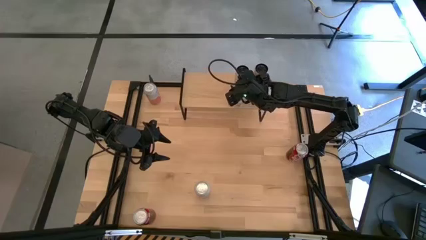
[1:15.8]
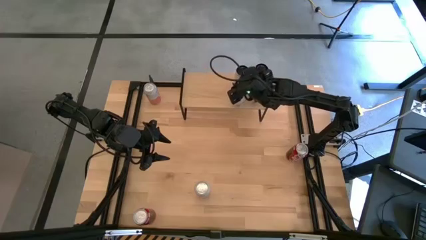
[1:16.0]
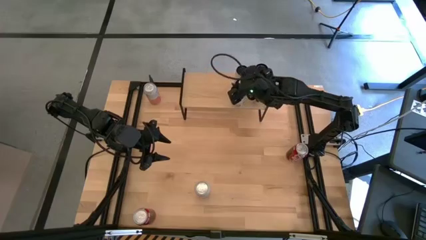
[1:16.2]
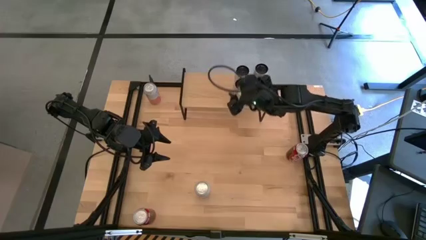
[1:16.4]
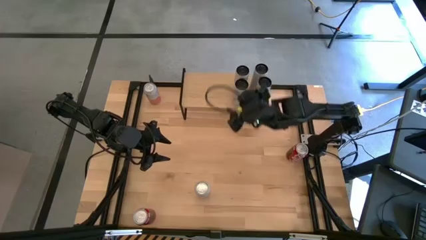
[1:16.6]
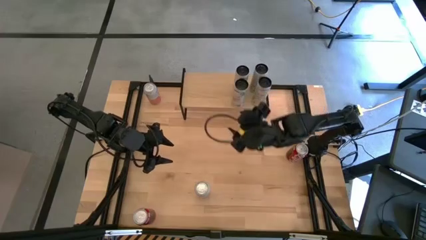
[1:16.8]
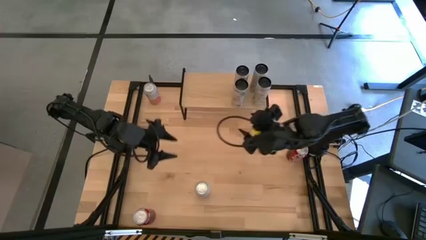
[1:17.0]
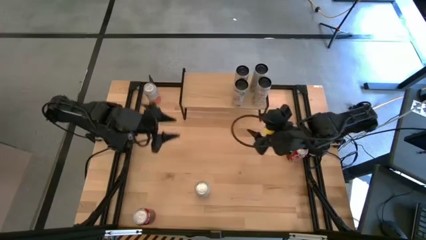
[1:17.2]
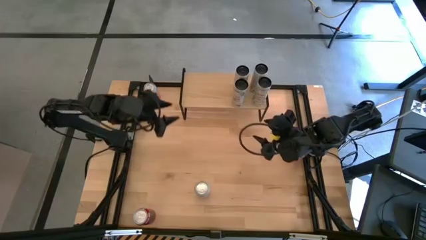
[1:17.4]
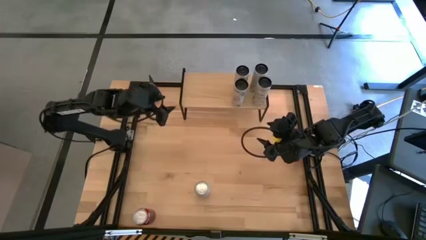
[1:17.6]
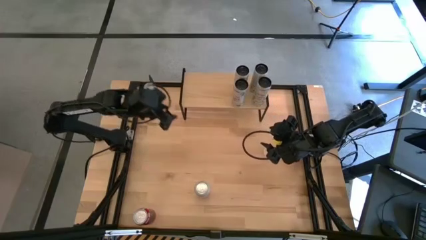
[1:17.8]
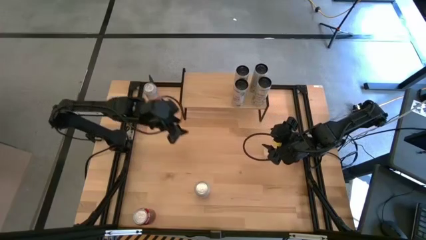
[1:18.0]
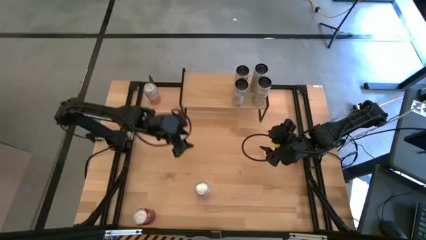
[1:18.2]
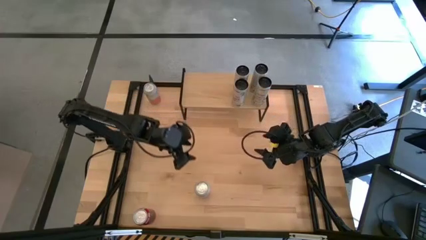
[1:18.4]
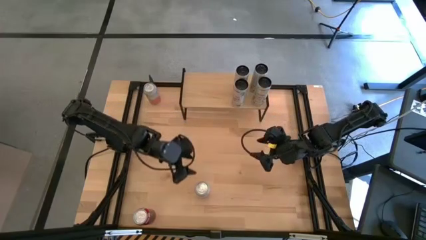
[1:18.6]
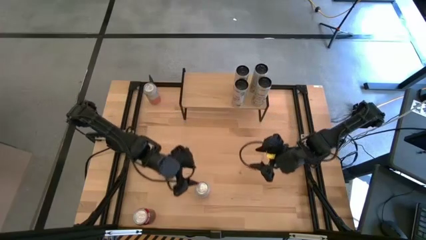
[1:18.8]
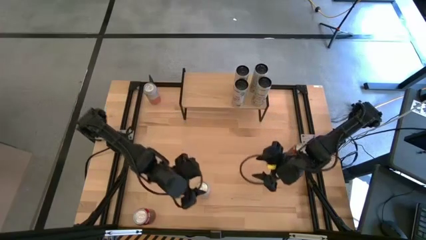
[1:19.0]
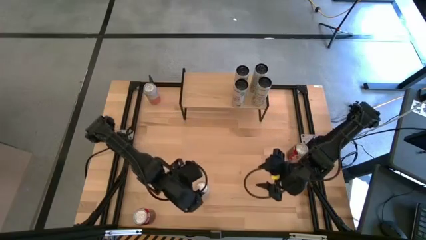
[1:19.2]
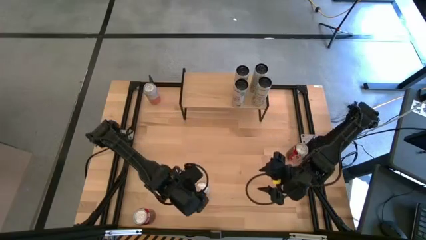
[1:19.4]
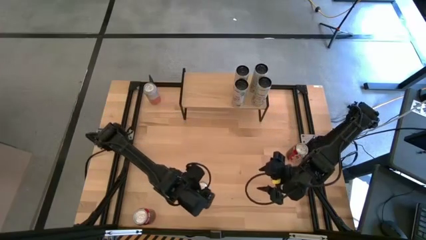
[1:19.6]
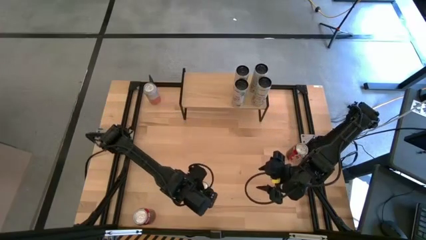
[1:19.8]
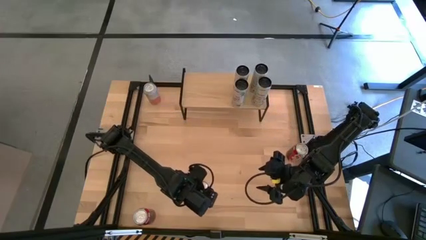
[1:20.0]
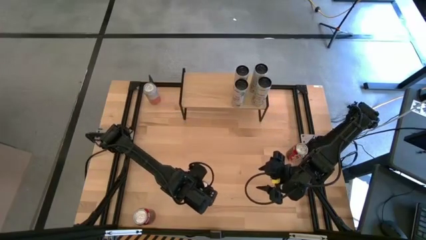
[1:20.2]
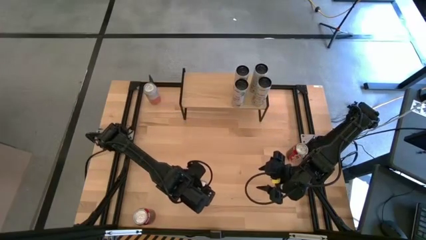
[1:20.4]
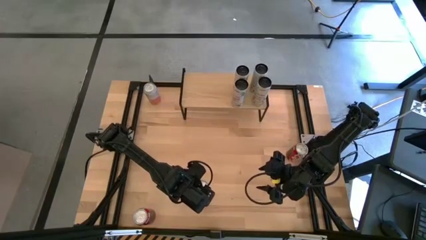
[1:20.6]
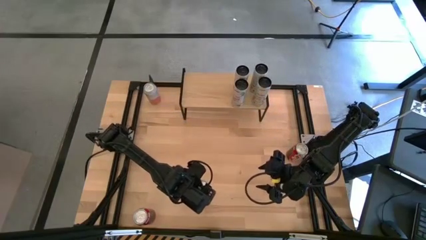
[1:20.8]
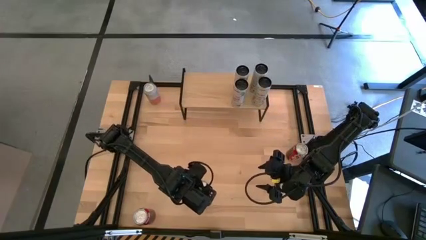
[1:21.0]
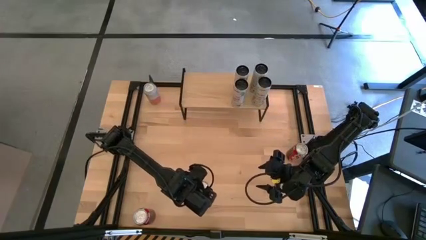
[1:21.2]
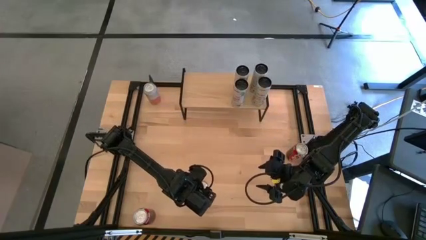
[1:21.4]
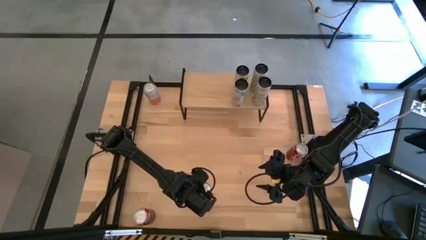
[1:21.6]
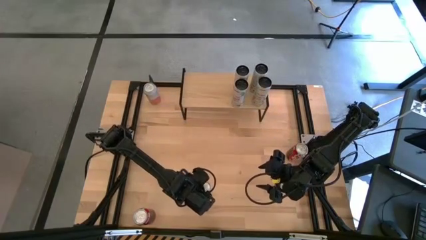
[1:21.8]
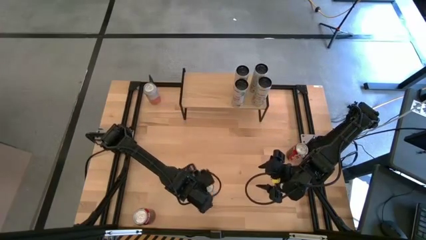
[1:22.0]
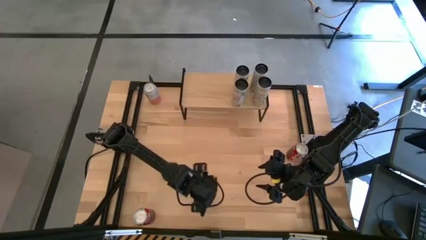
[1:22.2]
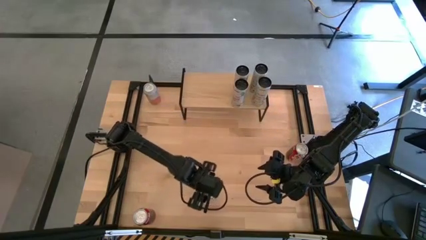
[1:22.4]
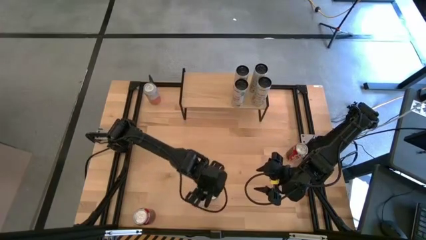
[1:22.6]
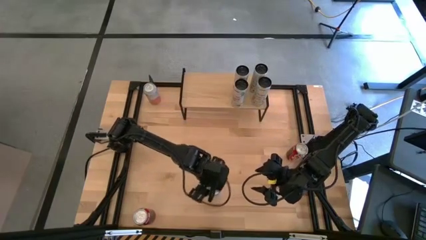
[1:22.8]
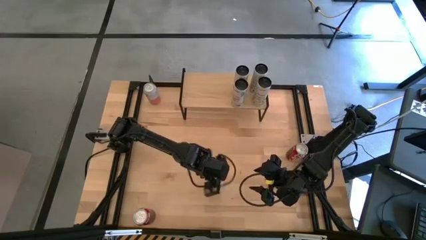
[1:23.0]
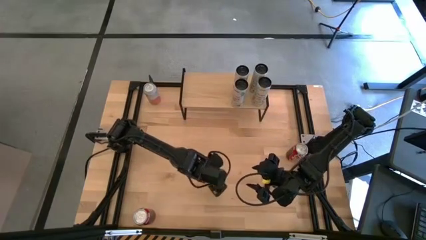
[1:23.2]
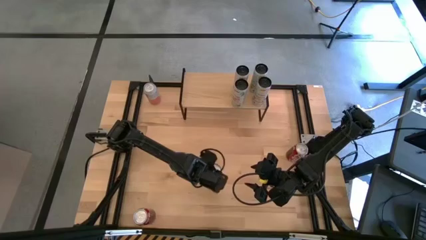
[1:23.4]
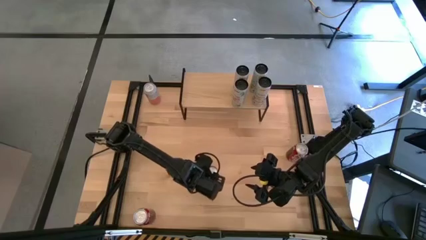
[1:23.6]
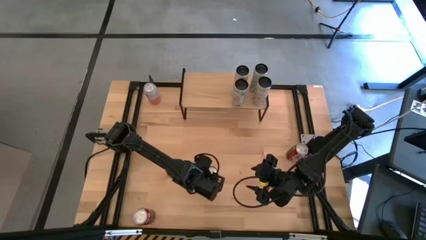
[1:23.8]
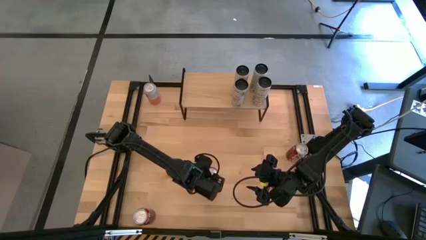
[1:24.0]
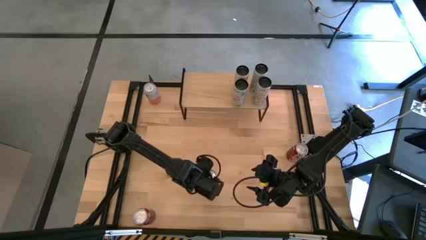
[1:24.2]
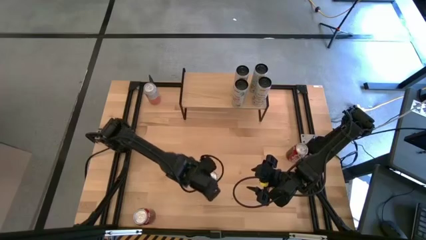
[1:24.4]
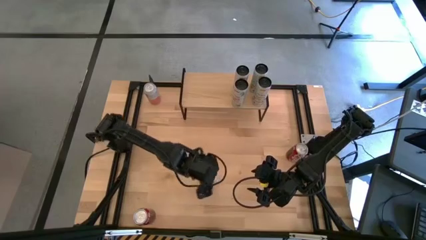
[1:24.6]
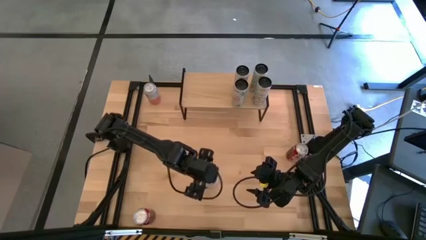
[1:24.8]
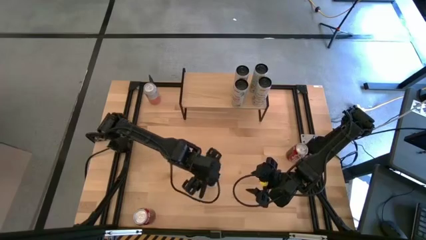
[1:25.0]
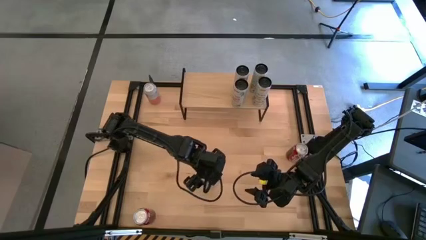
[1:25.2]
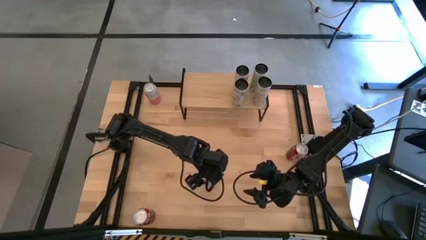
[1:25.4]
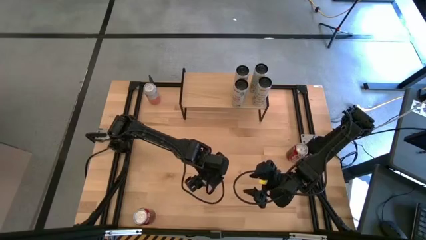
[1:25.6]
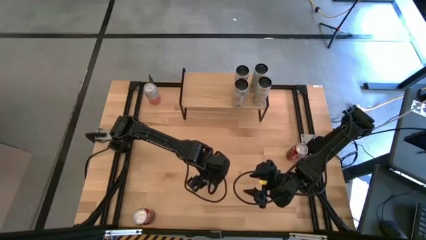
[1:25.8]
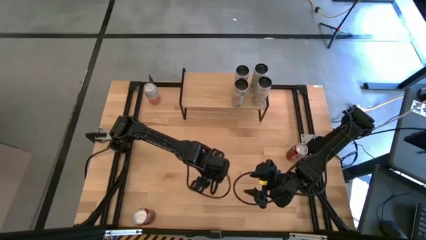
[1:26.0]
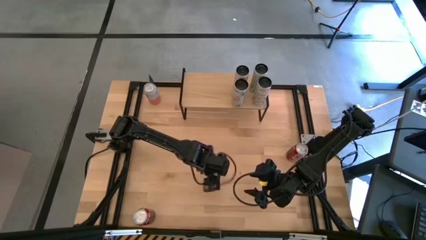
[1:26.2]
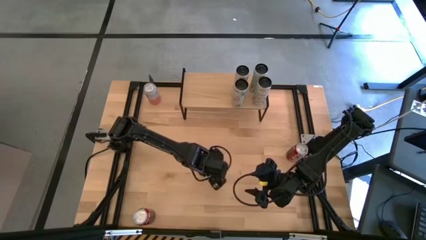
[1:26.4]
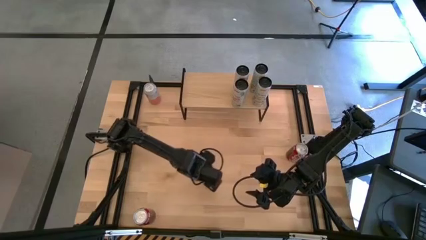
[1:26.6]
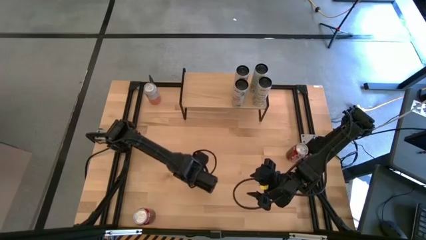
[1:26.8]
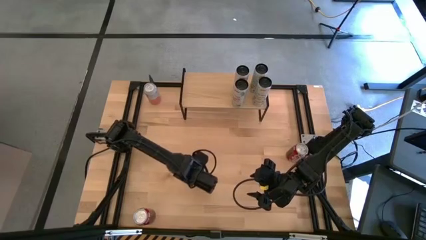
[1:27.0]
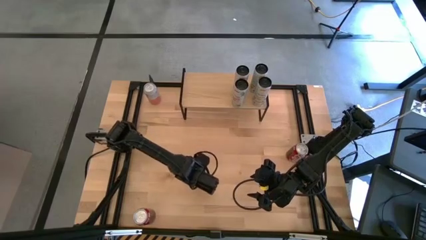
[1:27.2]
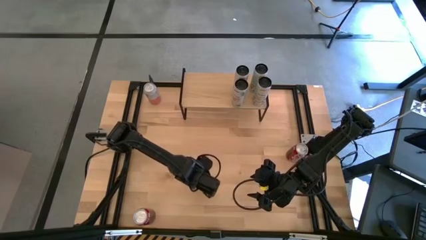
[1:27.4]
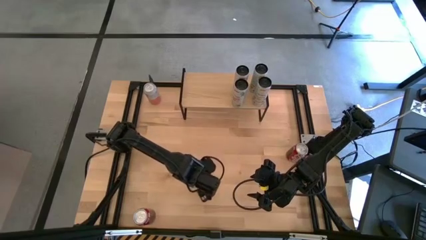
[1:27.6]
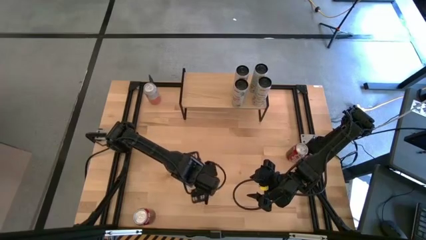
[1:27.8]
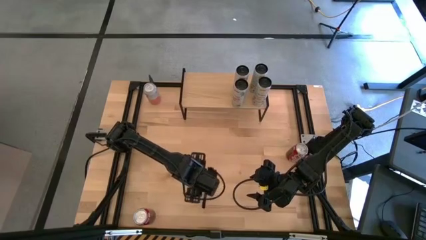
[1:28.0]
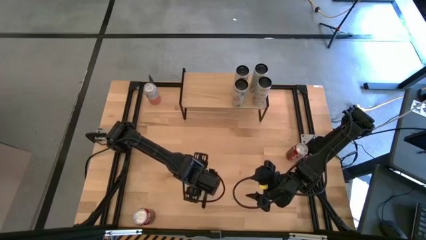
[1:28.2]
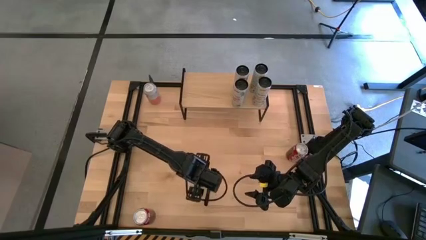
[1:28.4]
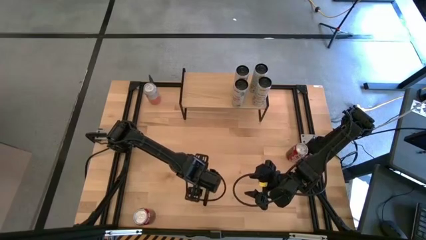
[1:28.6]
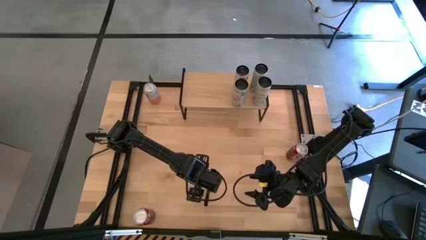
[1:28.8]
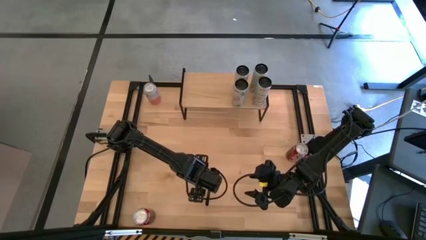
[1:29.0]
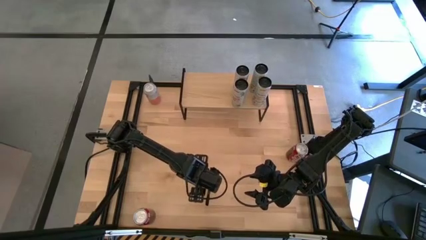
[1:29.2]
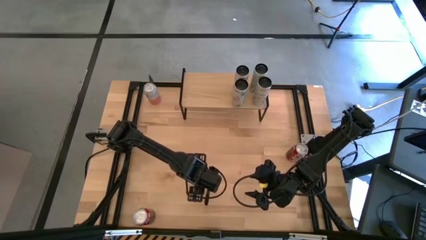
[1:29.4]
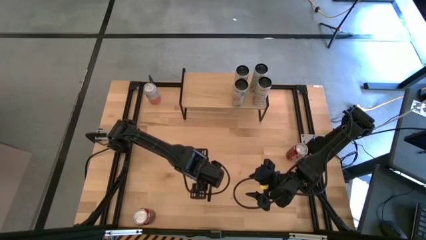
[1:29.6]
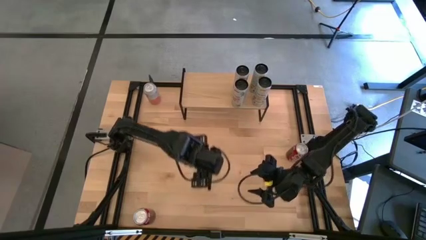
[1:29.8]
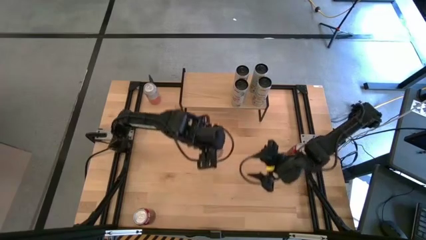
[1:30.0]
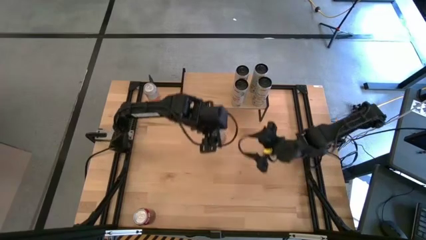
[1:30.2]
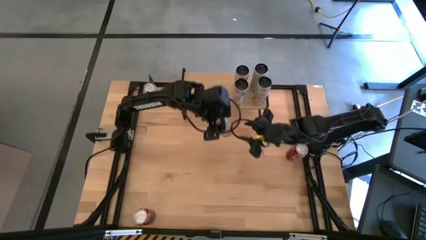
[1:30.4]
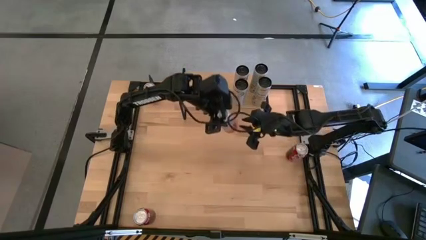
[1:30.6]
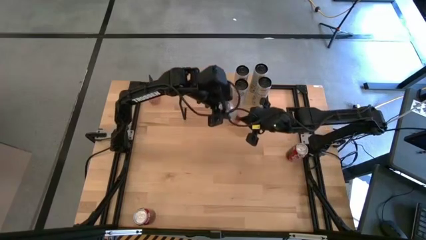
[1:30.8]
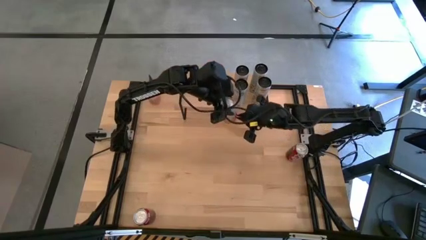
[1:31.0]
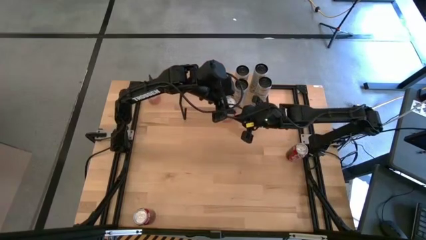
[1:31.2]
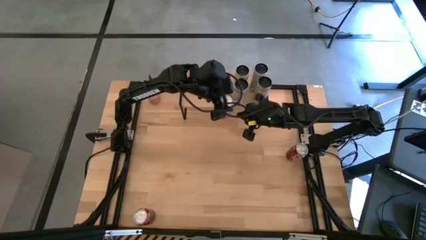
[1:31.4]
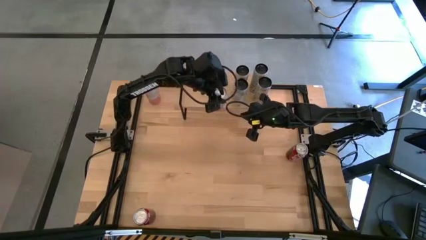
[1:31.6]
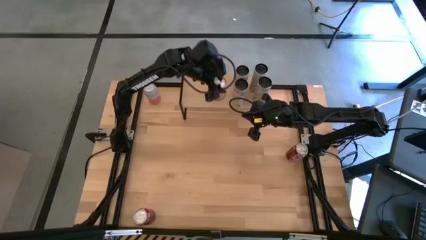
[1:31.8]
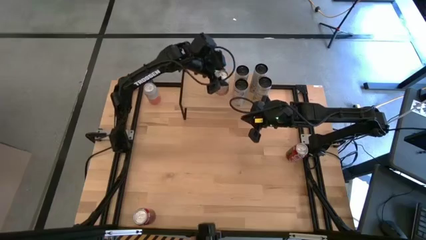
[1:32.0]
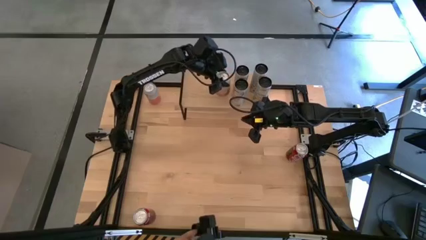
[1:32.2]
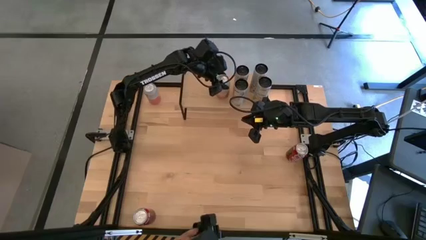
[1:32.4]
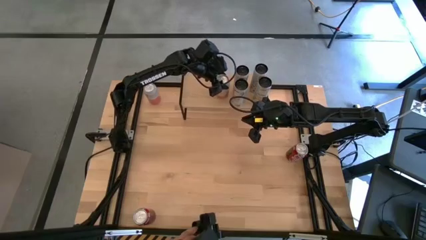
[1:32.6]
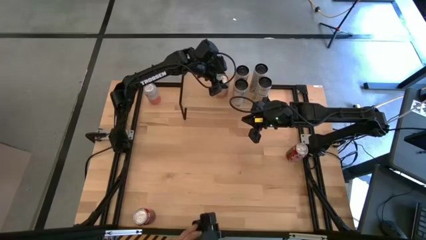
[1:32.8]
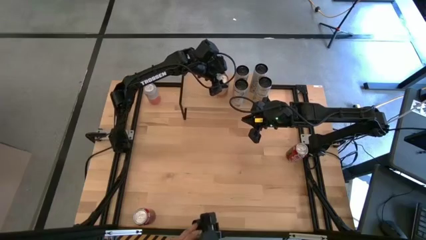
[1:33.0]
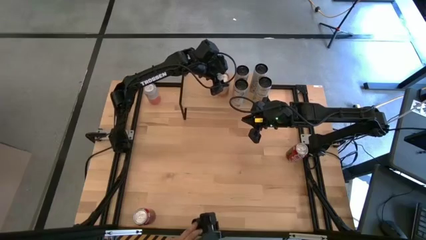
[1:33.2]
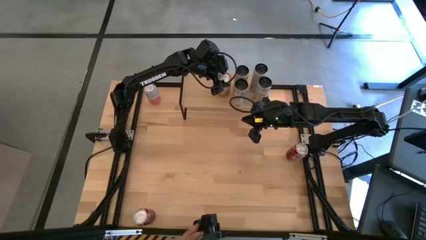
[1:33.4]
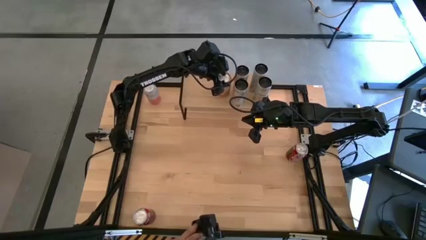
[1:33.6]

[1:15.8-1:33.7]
Task: Place canned beverage on shelf
Put the bottom orange and white soda can on the shelf
